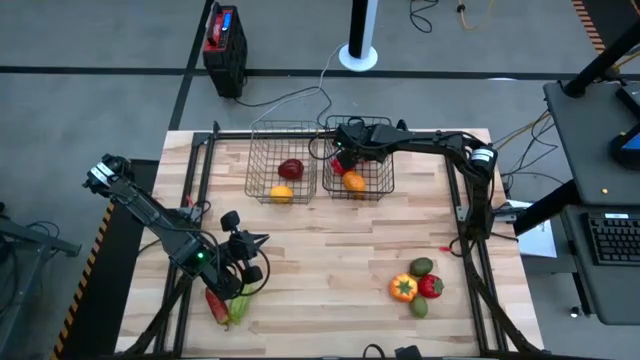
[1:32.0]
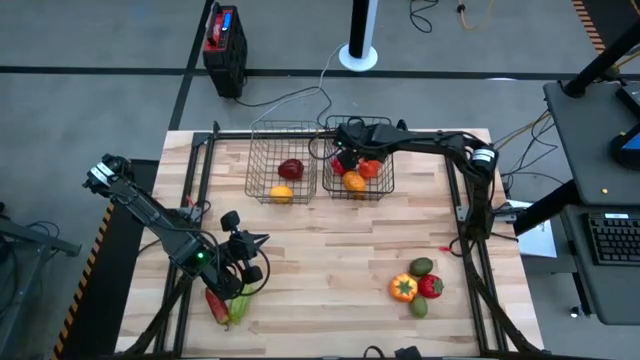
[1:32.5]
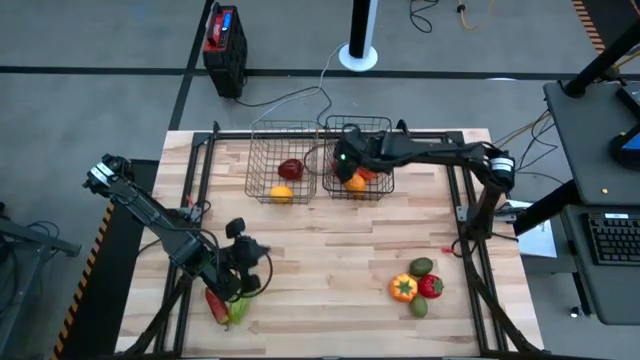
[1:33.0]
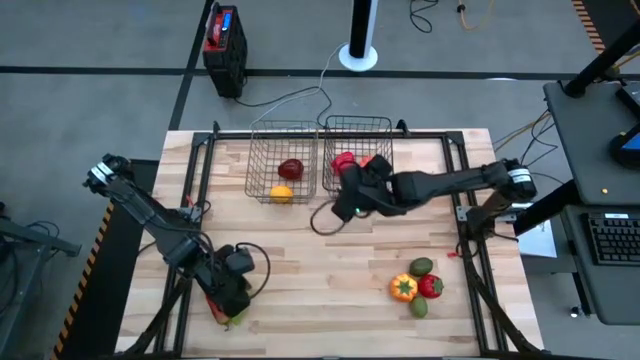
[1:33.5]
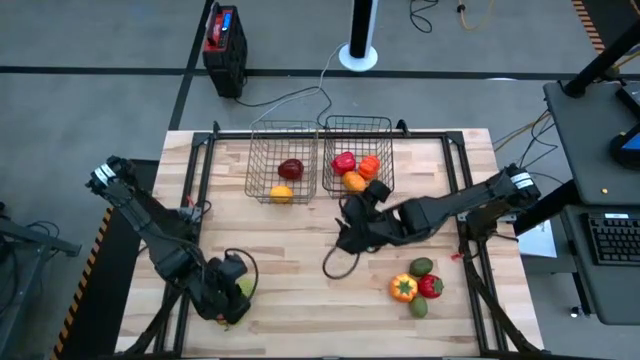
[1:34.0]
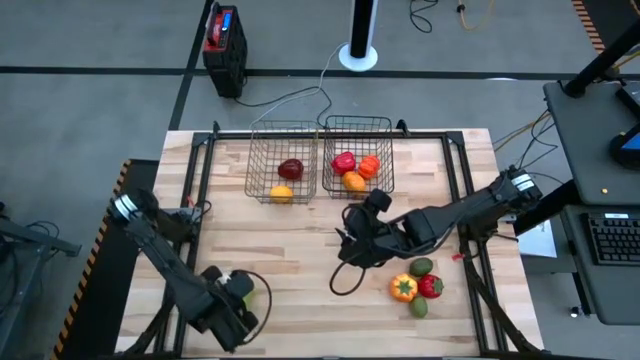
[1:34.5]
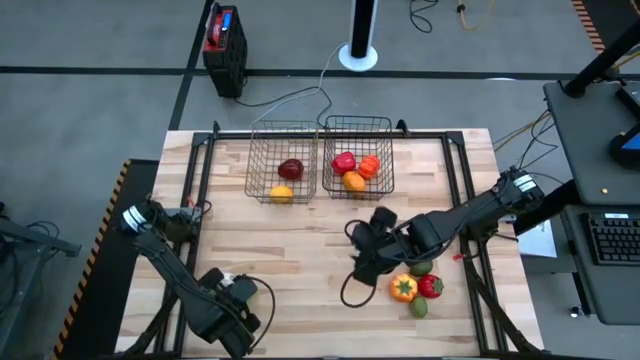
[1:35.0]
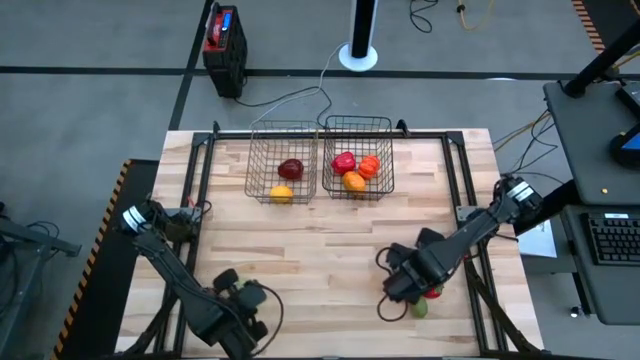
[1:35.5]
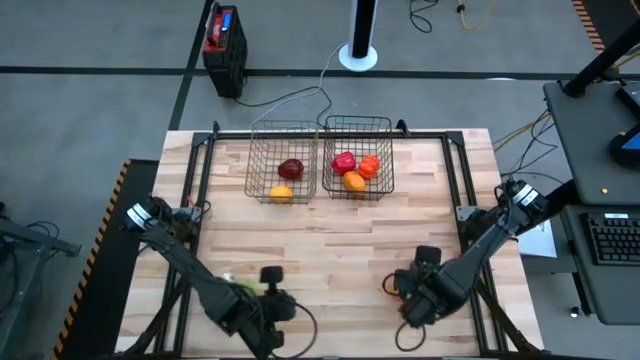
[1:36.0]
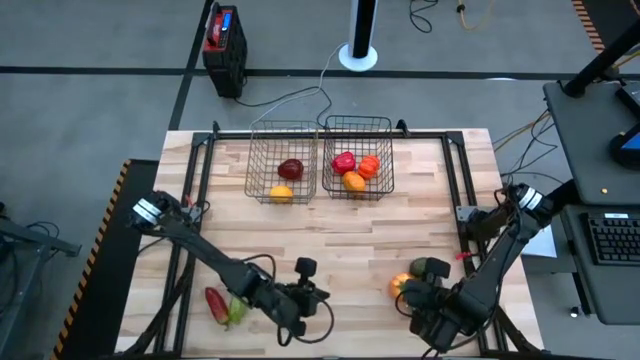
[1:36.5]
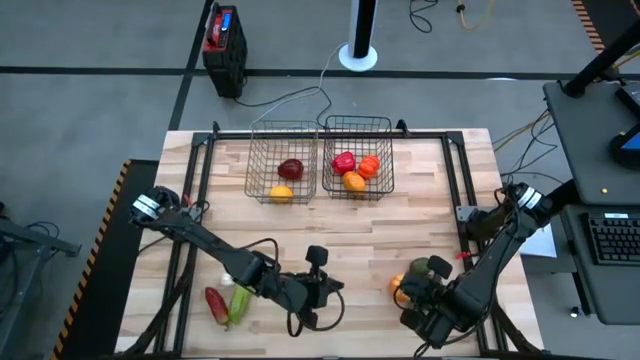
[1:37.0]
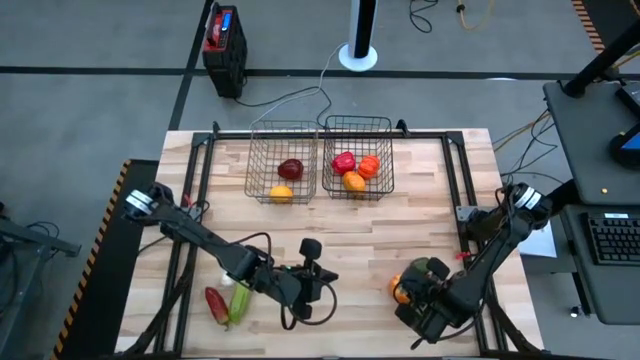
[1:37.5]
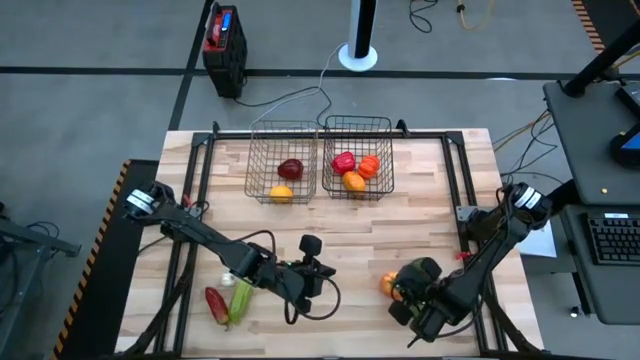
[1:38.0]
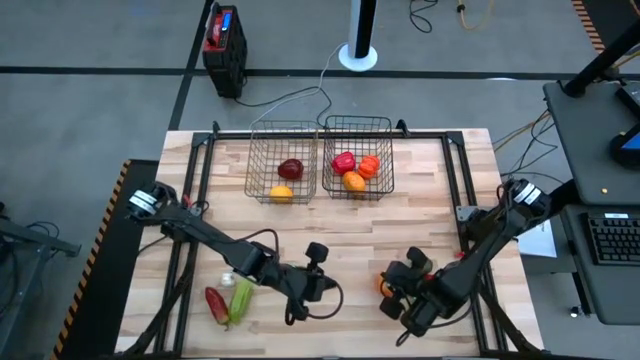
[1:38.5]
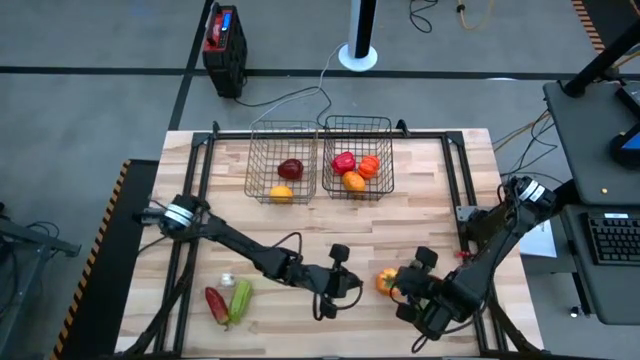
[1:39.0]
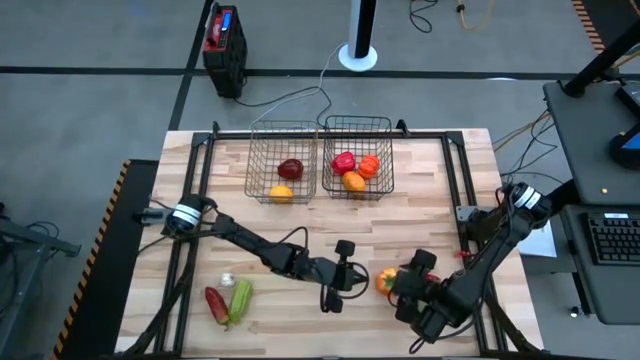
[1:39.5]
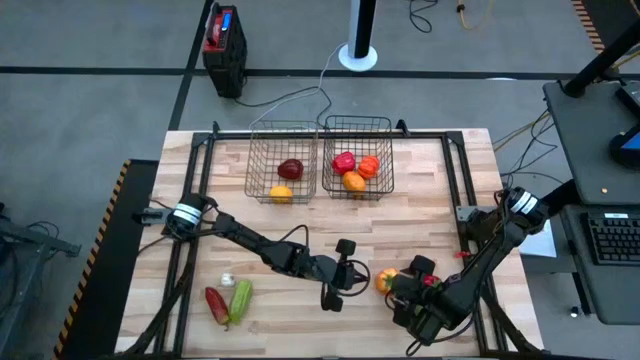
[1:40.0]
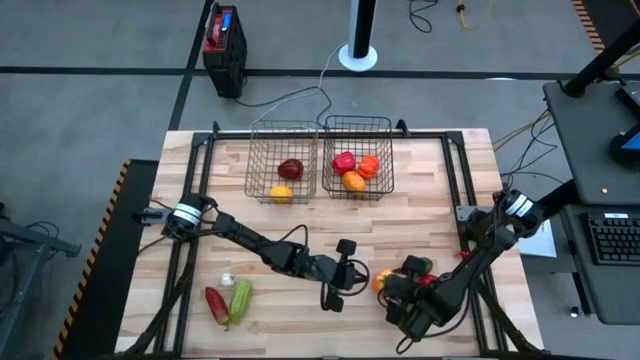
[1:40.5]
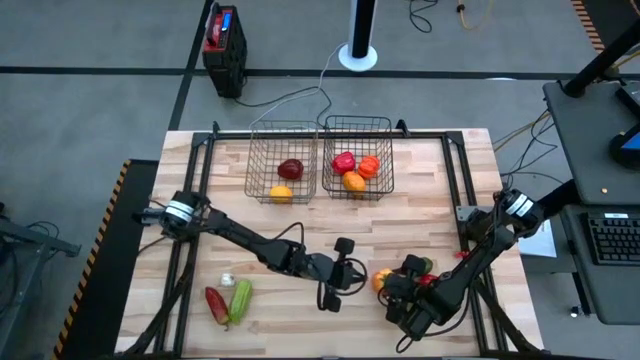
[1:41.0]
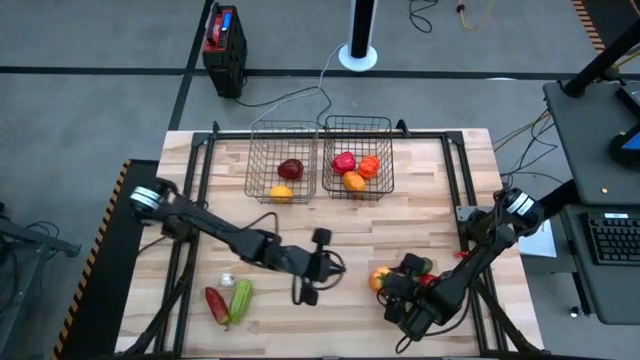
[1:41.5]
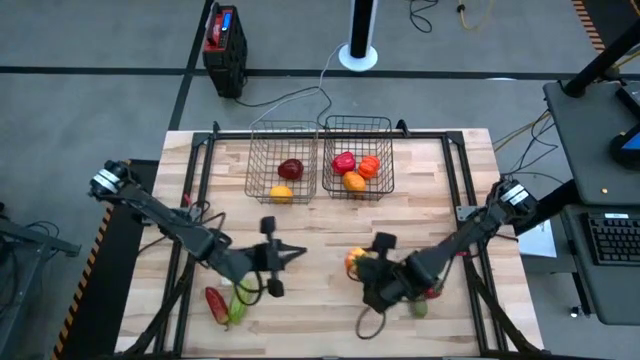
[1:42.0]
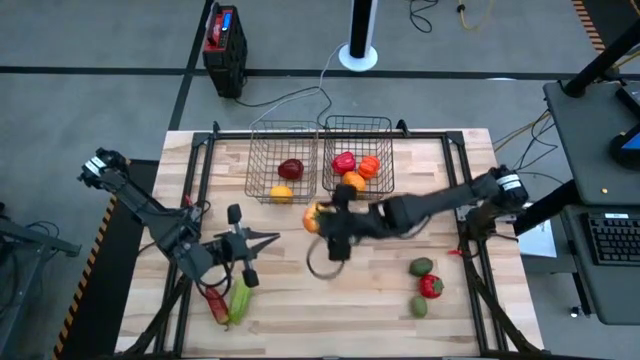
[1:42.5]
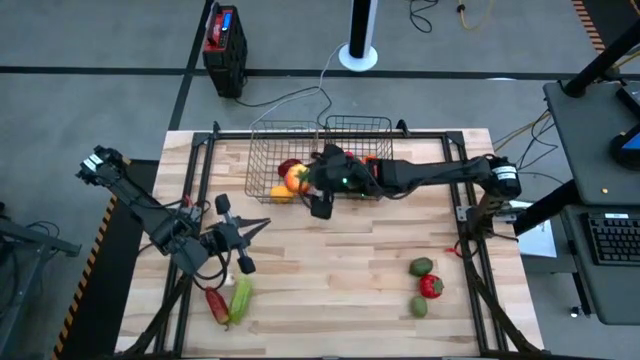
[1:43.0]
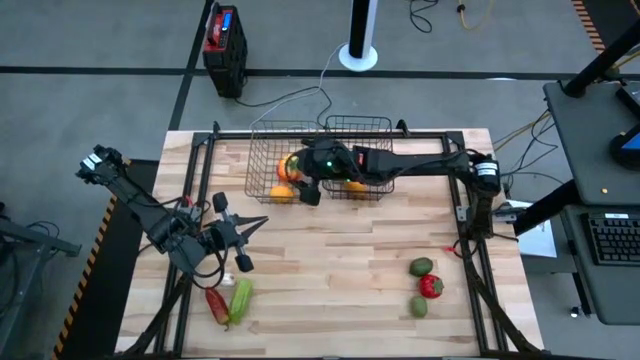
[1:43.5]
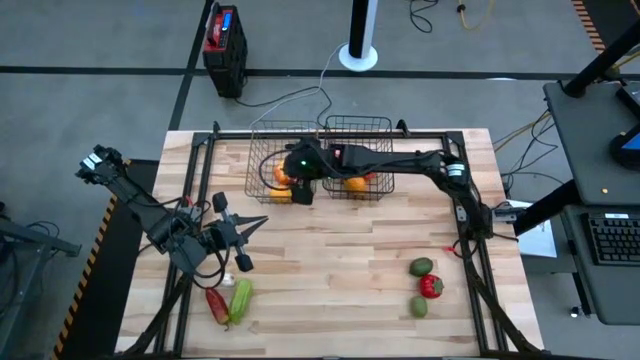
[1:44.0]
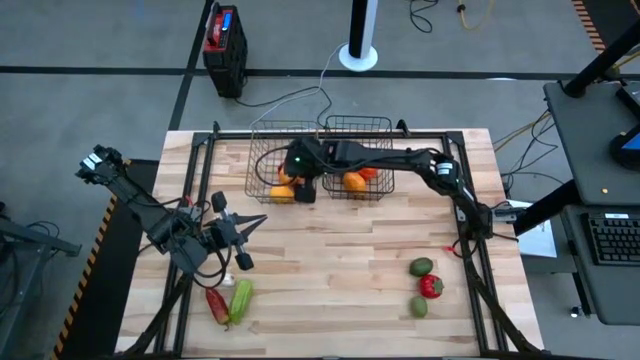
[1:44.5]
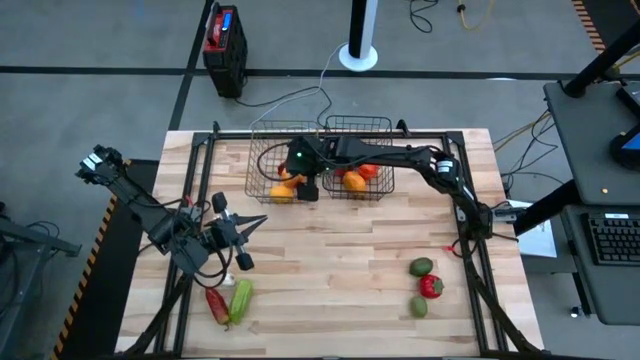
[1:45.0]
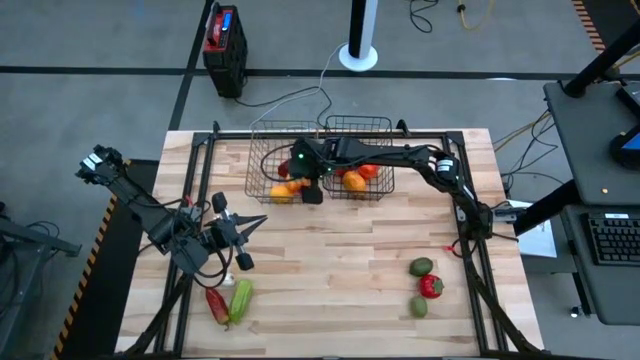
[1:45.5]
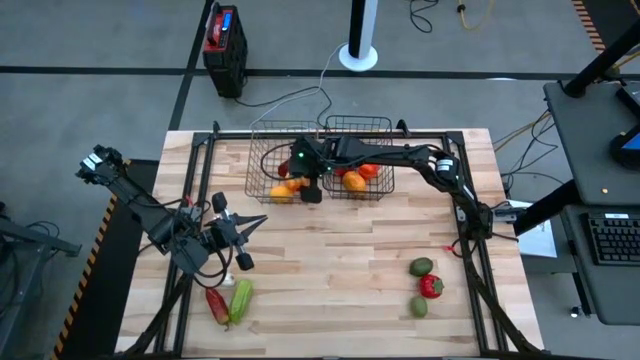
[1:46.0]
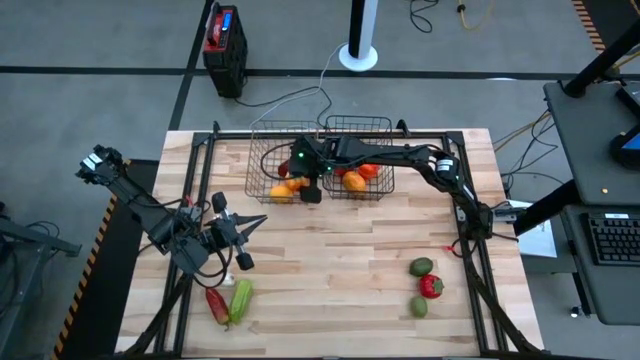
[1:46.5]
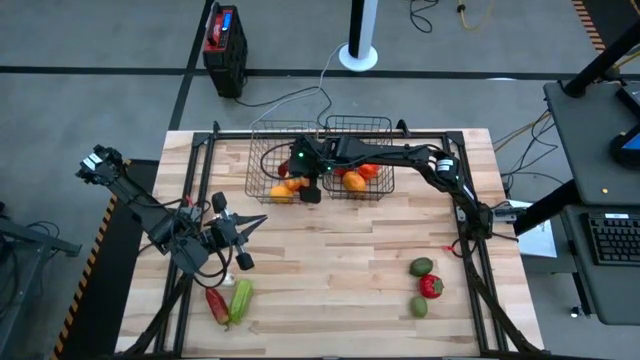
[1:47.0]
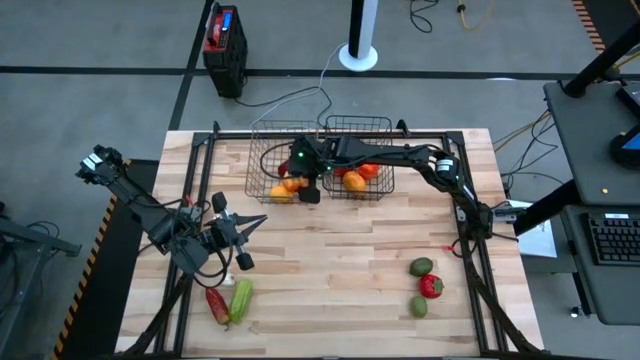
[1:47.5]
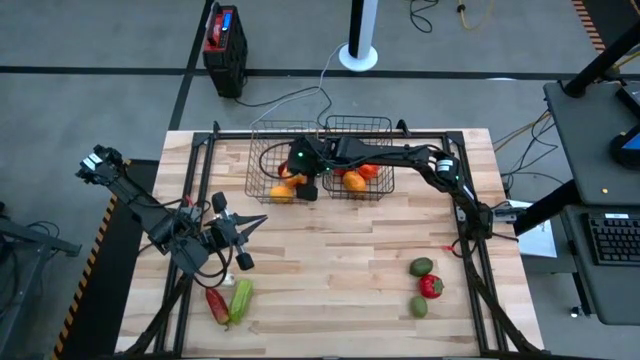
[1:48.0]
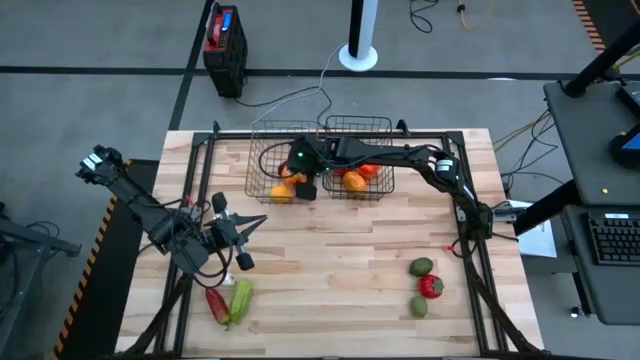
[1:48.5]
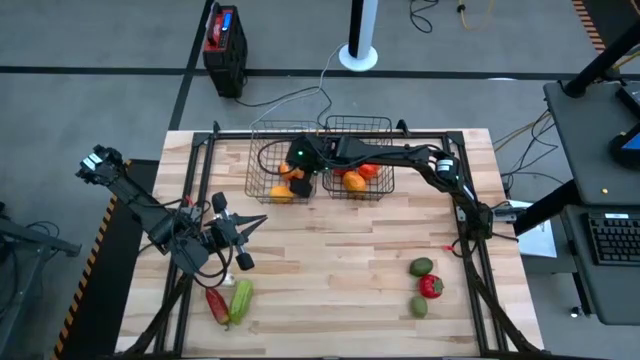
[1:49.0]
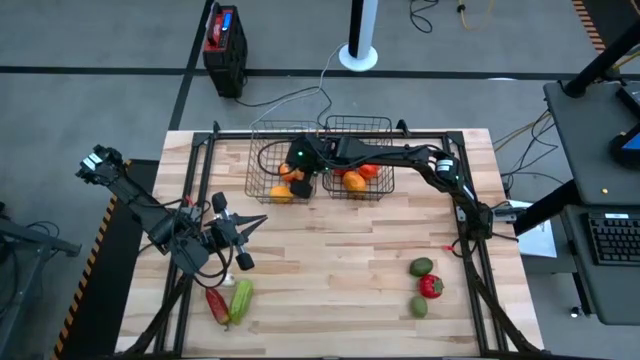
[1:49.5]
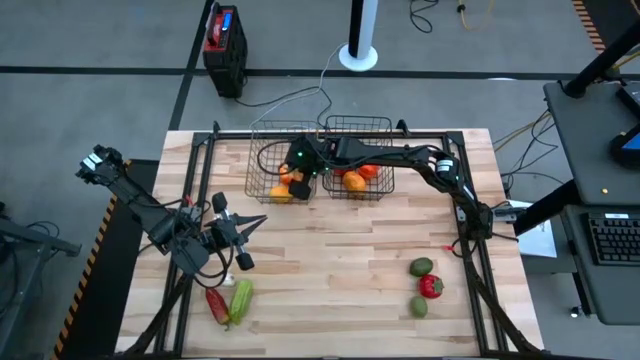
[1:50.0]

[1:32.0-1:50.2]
Task: Sort produce into baskets
Put the orange tomato into the silver wire basket

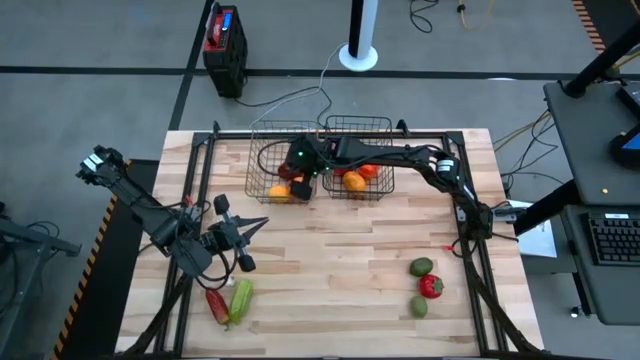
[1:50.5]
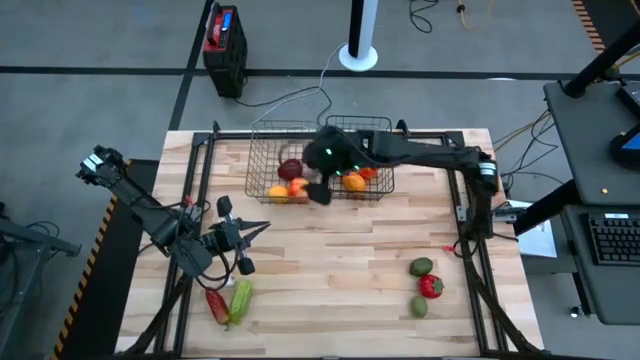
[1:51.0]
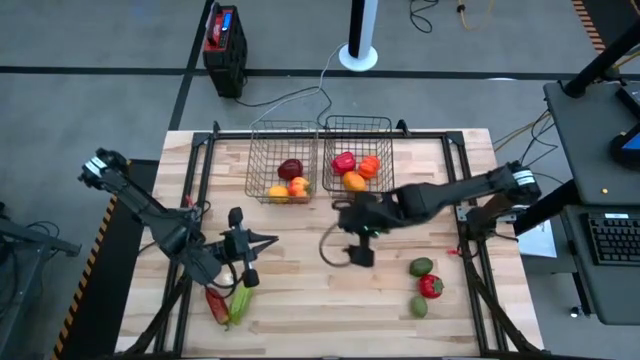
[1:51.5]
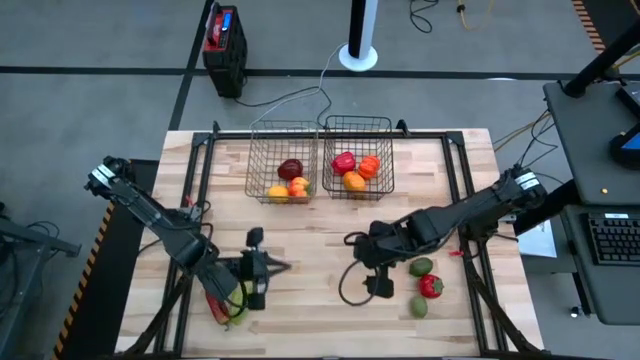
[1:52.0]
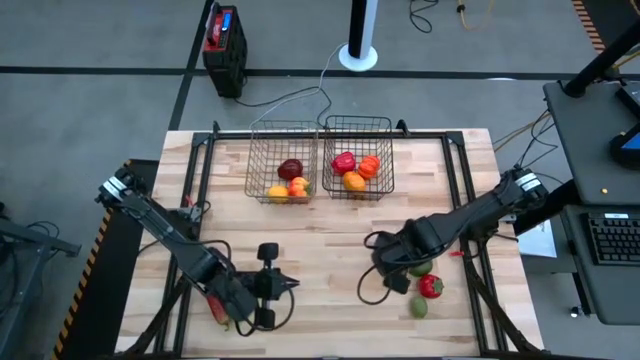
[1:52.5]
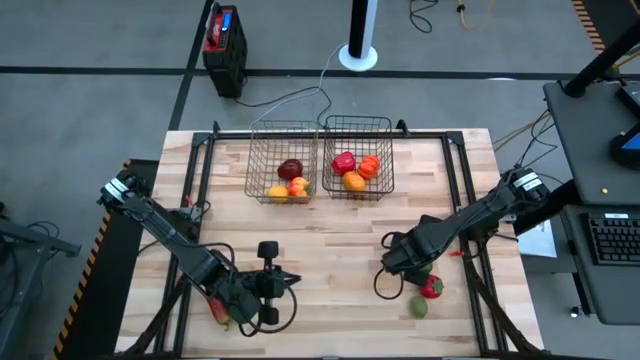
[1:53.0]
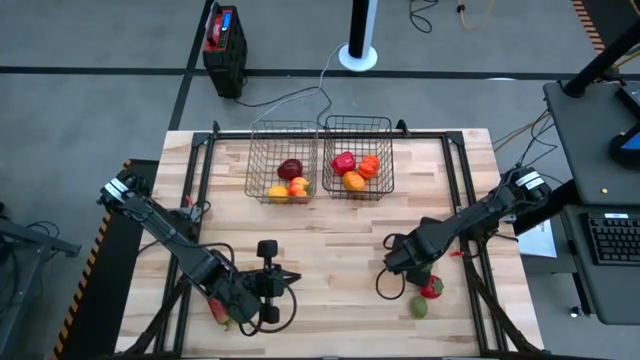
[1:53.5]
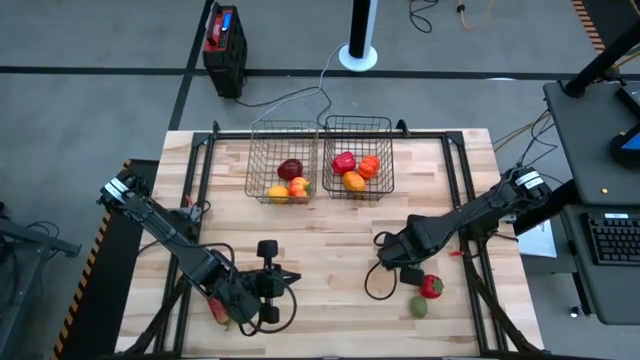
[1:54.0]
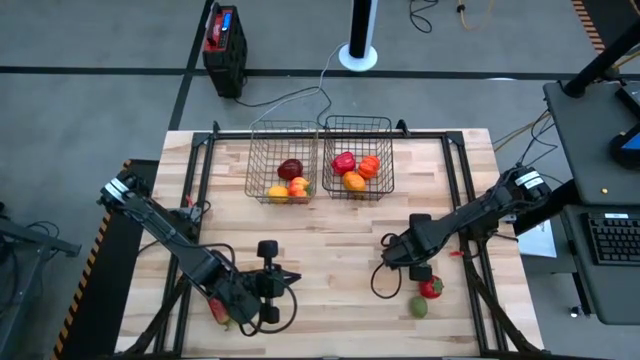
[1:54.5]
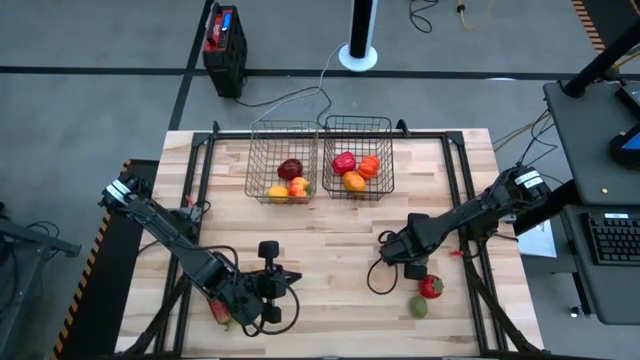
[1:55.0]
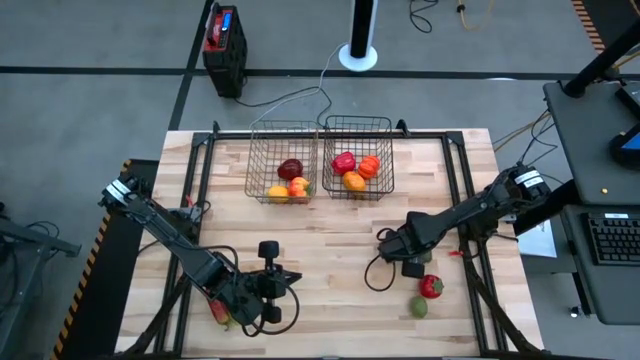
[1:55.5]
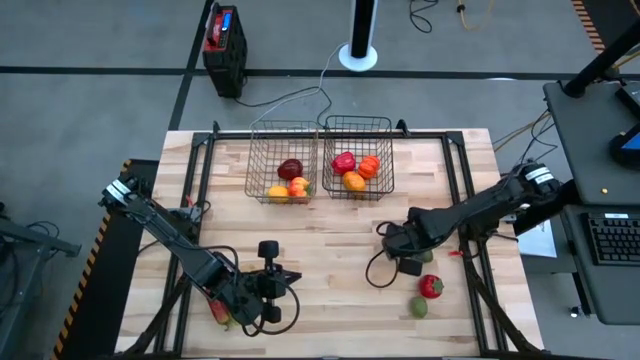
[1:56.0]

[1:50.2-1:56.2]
Put the top green lime into the silver wire basket
